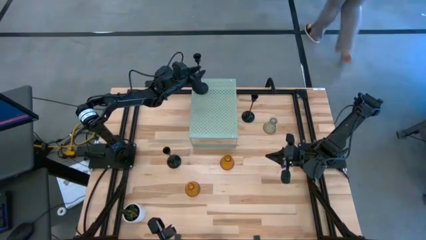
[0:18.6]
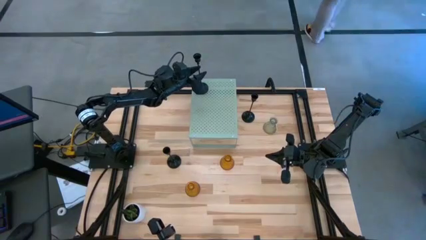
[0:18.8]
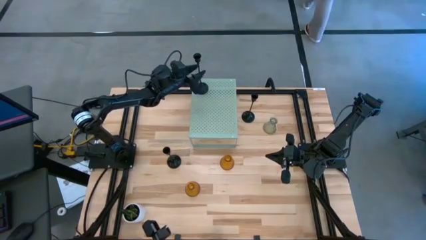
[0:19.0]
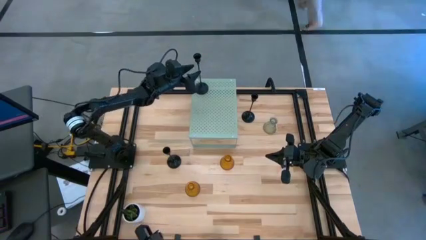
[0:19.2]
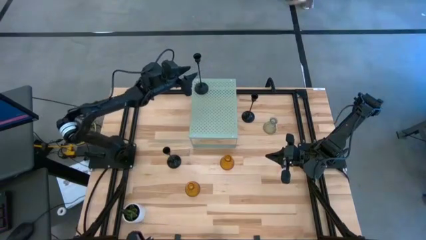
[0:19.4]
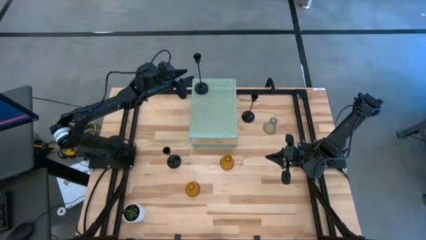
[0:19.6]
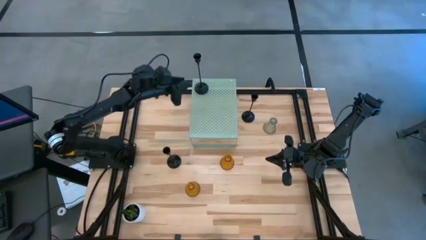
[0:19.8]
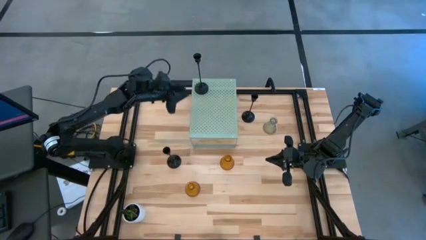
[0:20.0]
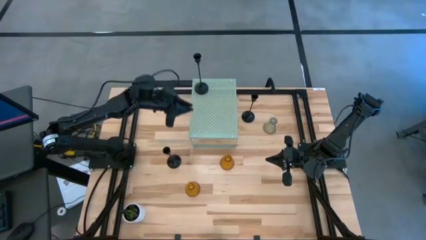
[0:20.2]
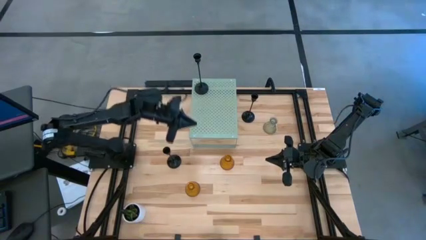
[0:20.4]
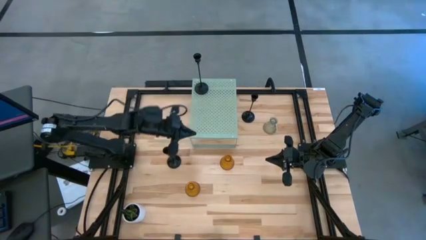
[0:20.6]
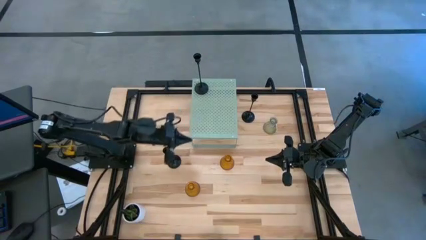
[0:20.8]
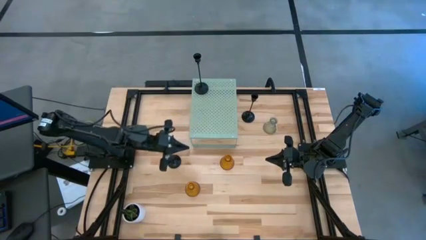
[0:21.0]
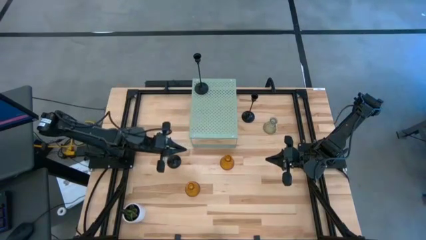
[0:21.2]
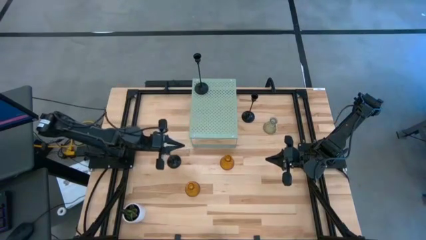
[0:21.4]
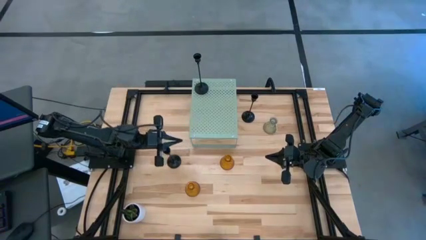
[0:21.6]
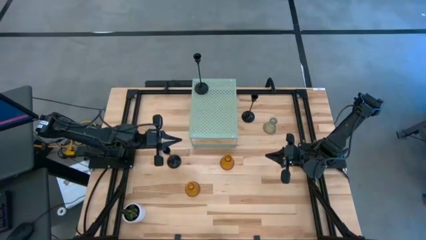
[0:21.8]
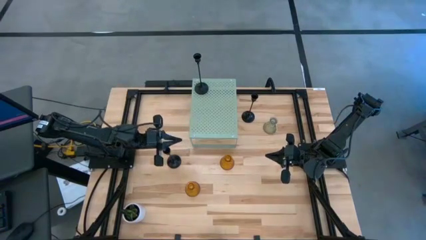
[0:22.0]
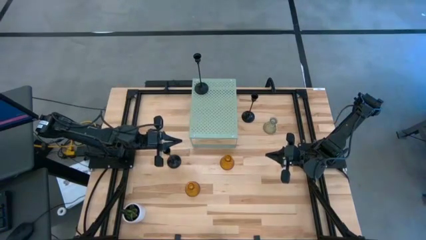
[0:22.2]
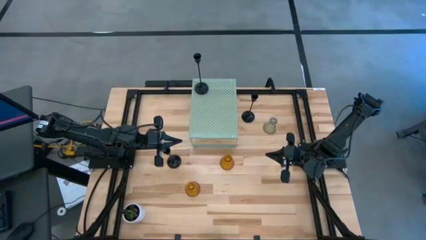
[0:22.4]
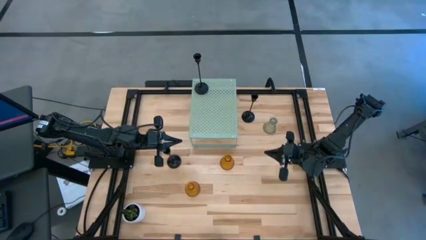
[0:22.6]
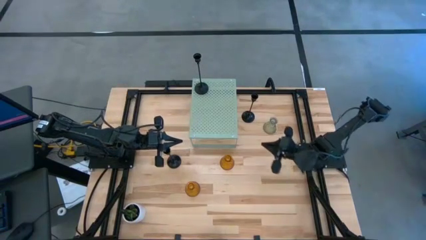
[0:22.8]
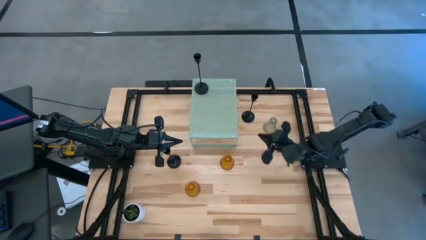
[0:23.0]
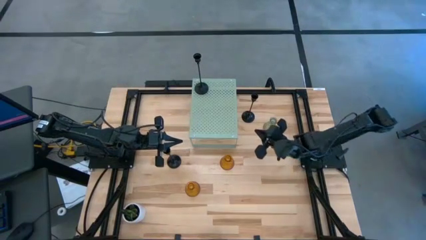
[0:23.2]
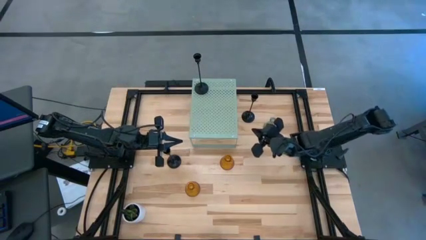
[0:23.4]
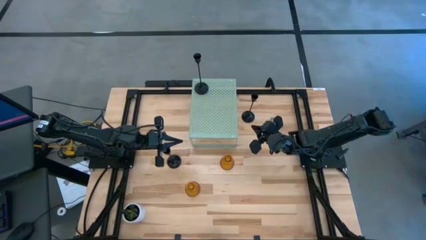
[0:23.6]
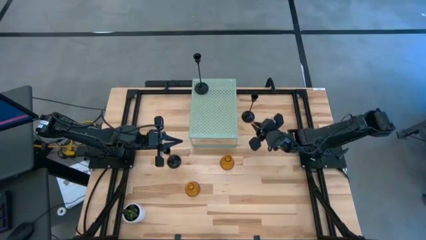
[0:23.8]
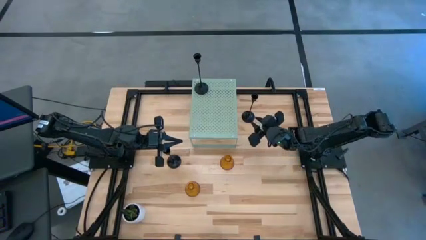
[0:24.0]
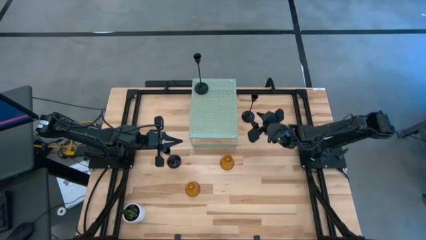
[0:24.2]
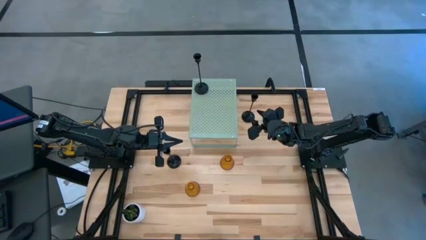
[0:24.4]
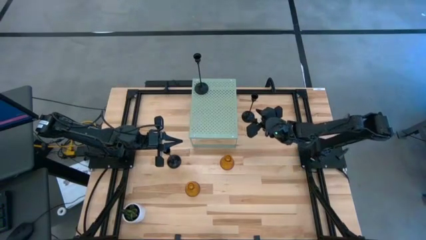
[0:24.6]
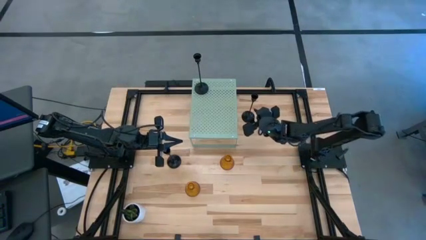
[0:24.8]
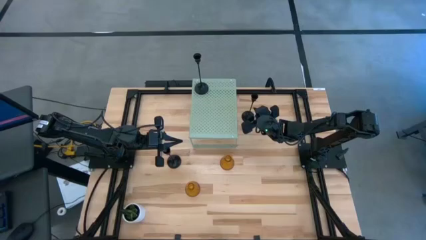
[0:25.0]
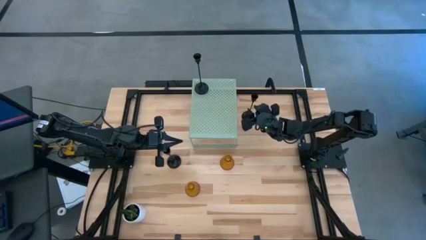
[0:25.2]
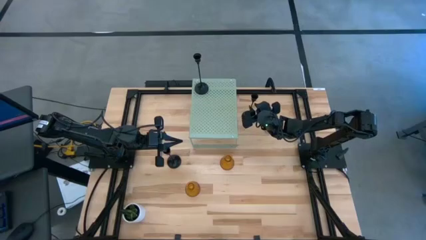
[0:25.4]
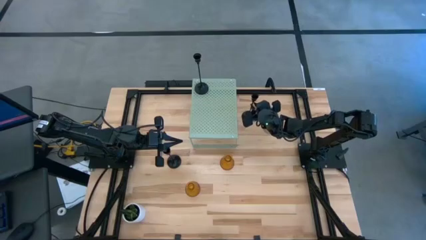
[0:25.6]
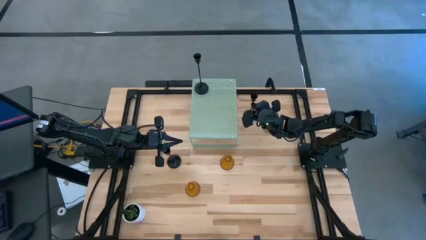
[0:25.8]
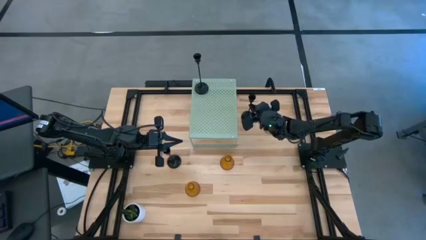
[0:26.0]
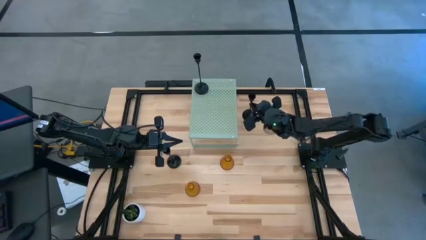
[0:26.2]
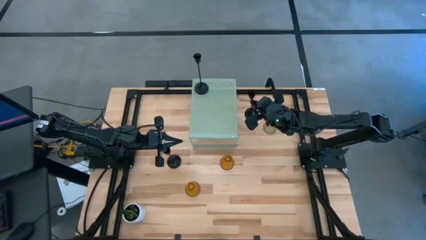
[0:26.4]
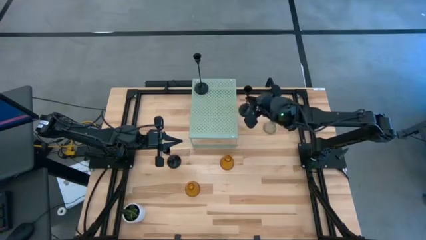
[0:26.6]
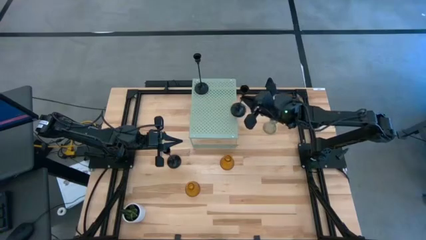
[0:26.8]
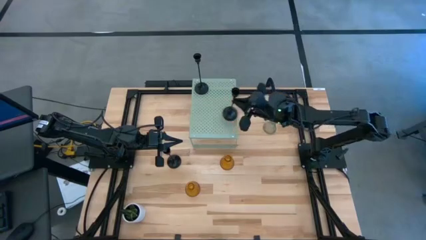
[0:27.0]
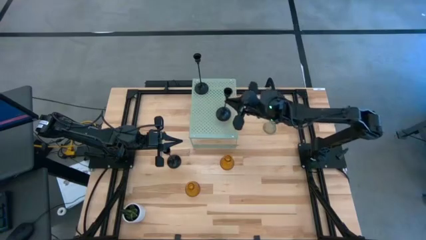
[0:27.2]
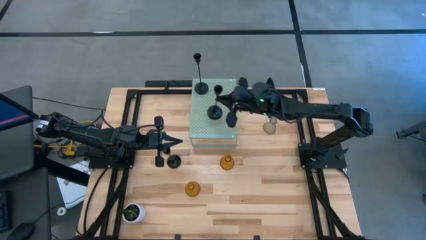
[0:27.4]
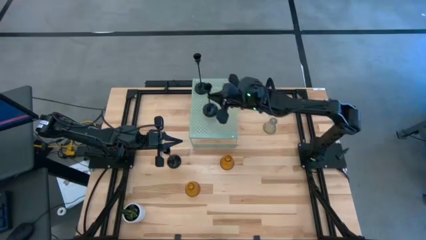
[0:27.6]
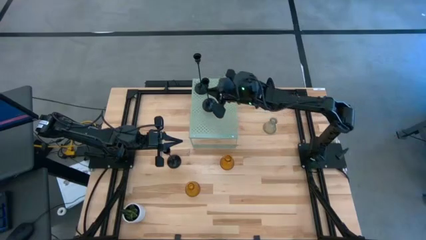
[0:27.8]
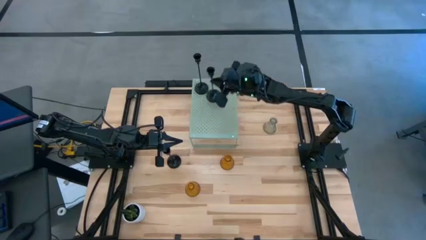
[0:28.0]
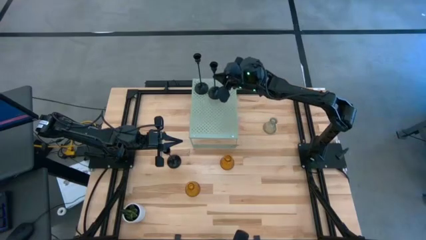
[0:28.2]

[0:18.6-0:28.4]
Task: Pick & Place candle stick holders
Put the top black candle holder on the shelf aligned with the other black candle holder

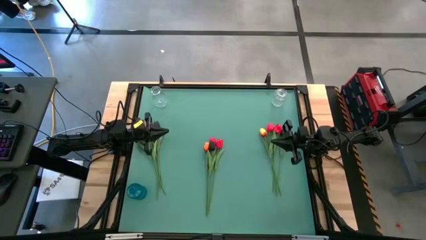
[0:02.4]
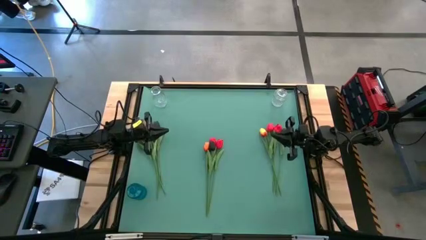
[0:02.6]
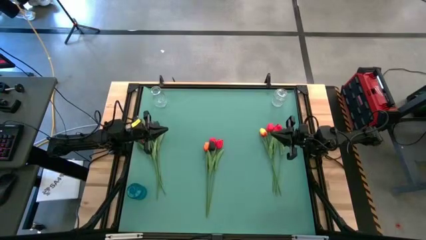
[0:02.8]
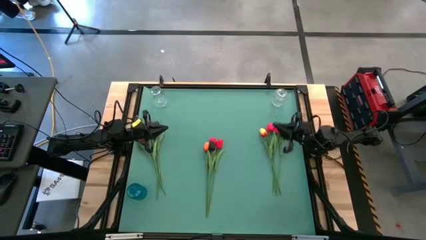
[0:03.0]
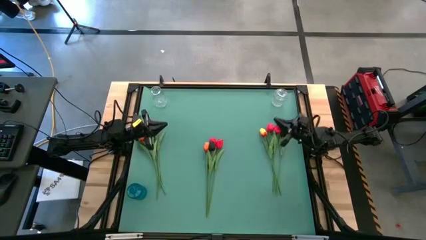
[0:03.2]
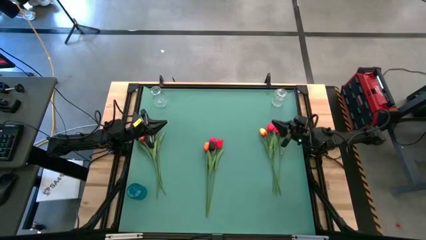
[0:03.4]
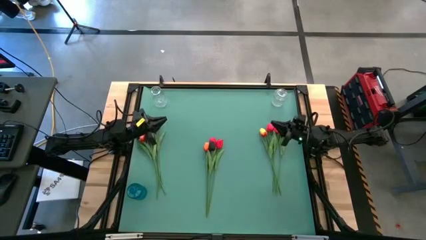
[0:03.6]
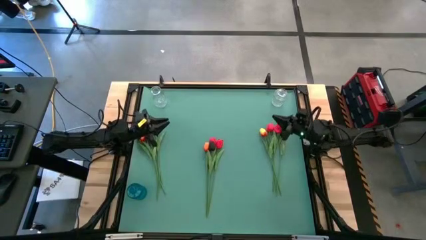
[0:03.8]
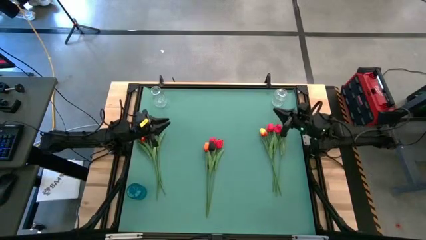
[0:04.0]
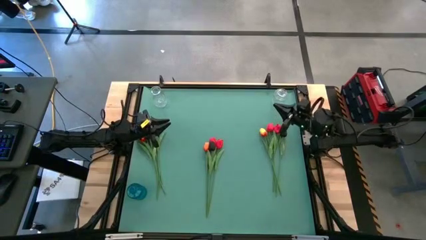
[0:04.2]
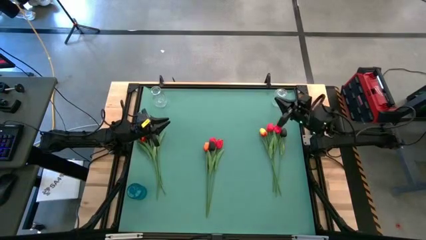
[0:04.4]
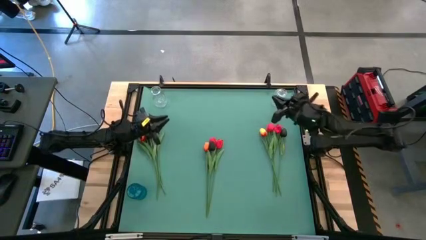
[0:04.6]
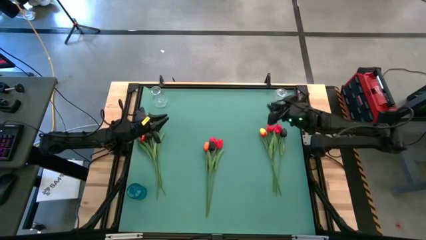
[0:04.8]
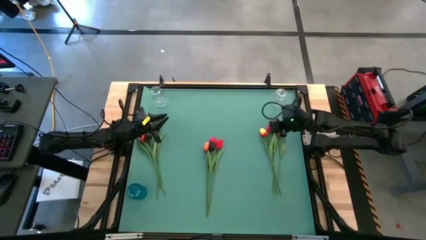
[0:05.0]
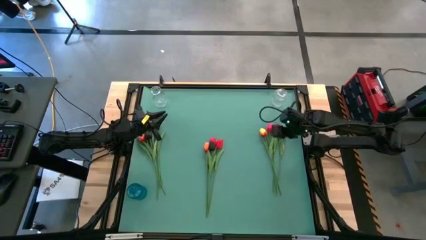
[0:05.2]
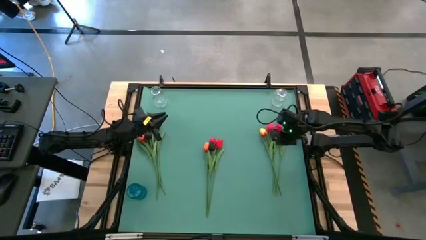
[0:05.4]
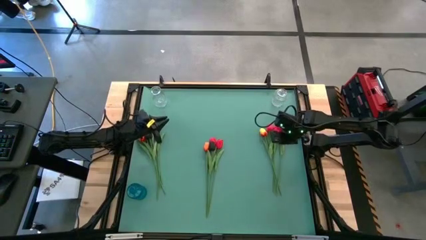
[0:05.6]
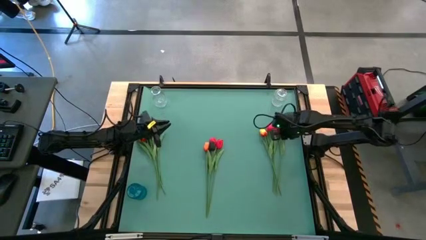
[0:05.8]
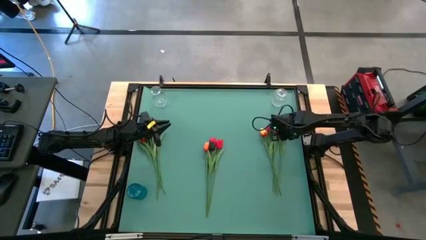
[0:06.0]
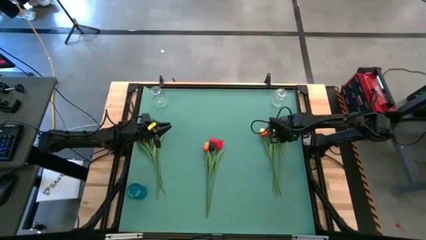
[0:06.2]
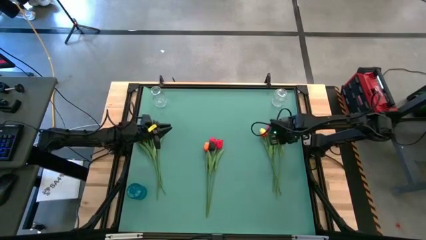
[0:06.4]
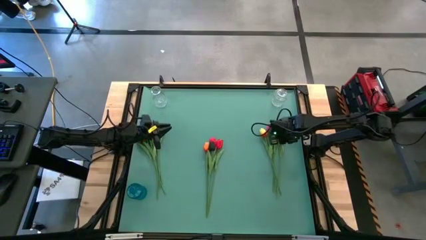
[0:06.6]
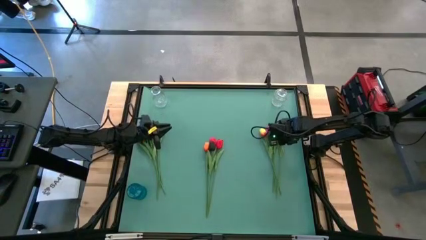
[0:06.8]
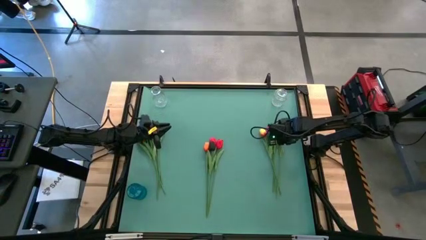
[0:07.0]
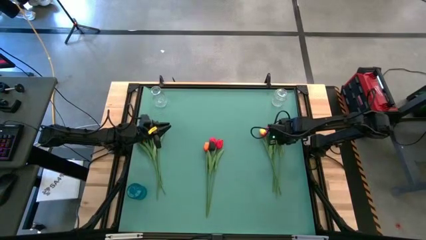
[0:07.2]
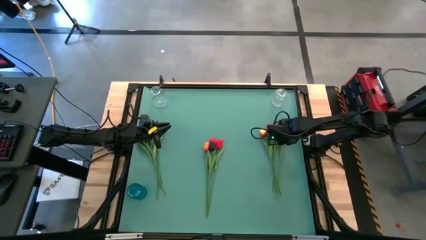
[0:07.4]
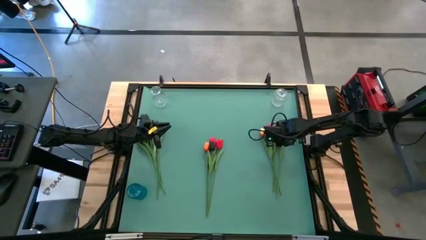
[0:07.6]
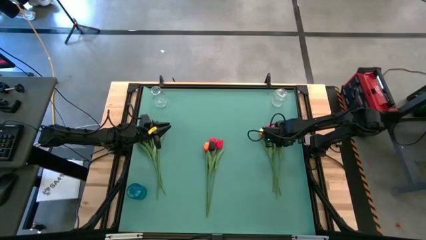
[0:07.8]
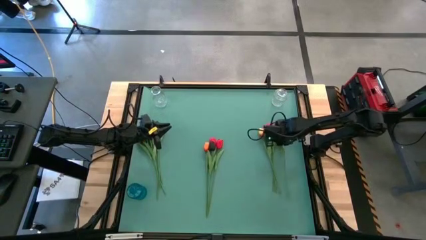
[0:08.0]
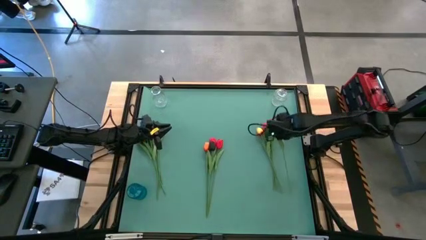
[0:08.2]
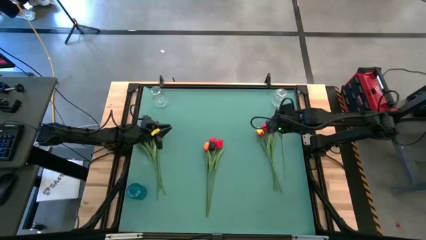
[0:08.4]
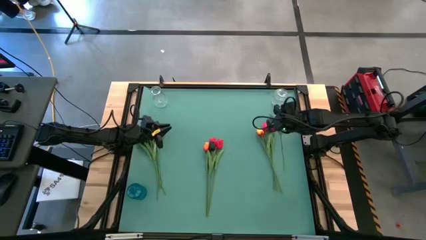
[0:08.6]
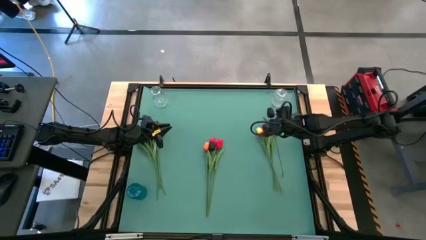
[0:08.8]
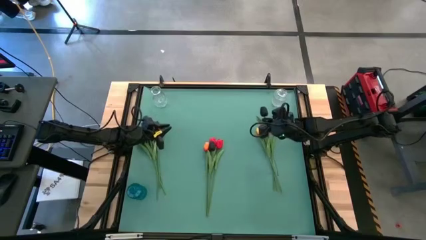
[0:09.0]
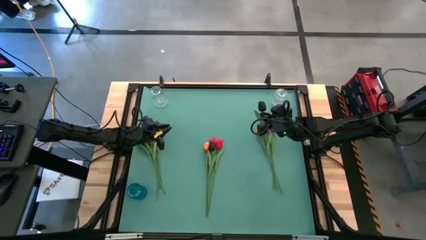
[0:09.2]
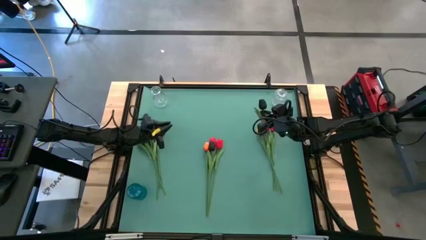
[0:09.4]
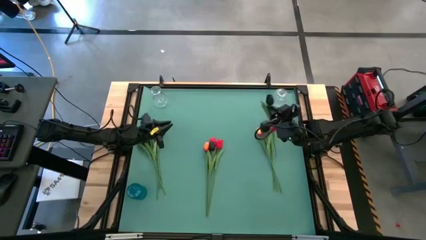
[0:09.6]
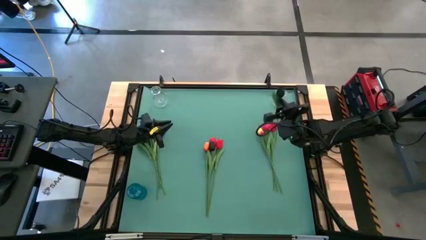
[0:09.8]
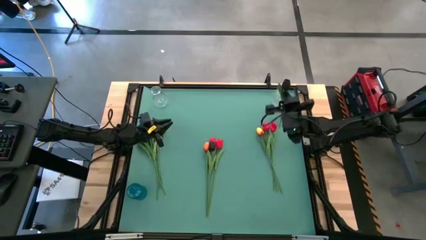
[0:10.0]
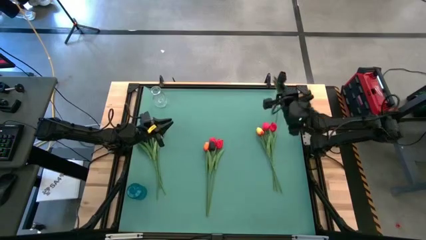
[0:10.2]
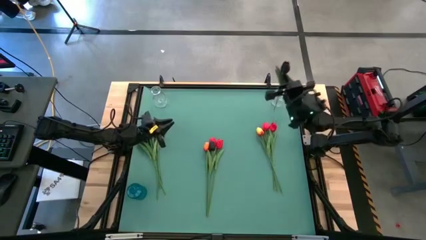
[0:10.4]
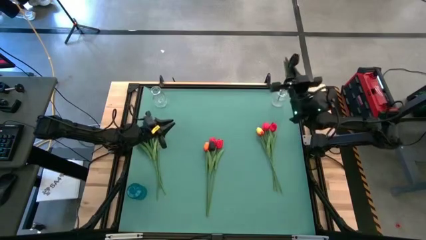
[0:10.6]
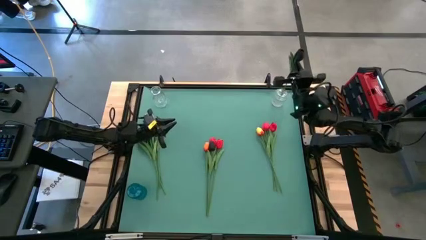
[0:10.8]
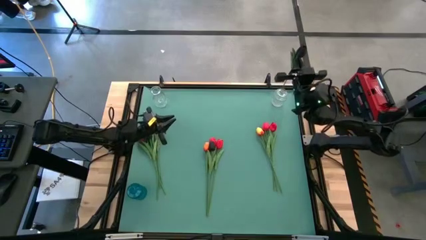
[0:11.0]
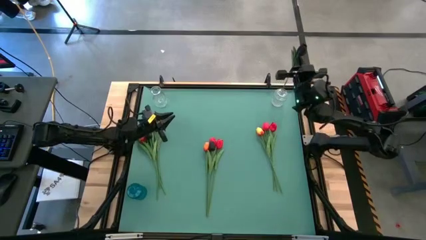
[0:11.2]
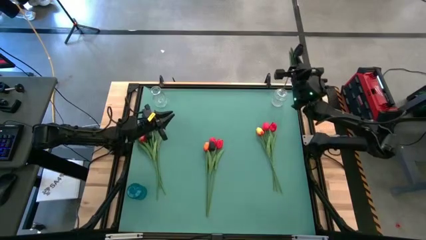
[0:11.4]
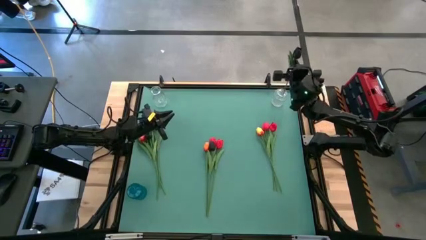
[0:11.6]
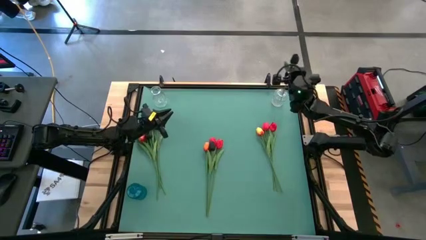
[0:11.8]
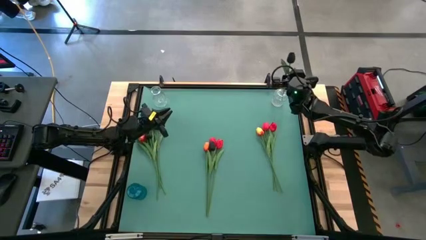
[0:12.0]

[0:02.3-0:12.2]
Task: Sort flowers into vase by color
Put the black tulip into the right transparent vase
